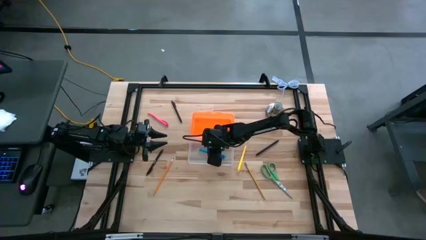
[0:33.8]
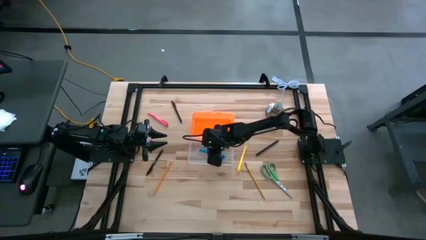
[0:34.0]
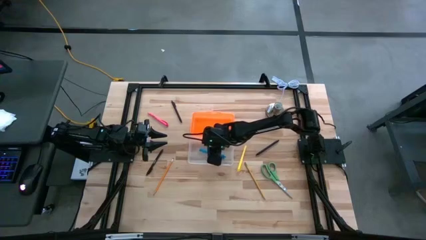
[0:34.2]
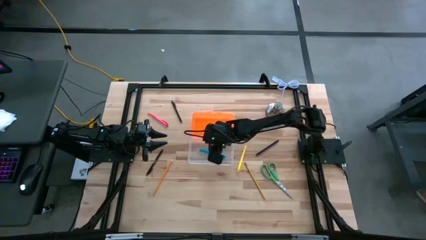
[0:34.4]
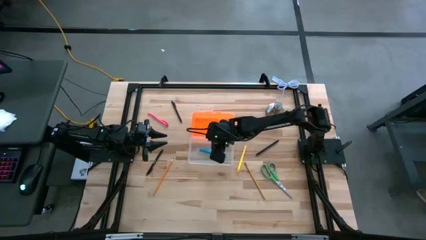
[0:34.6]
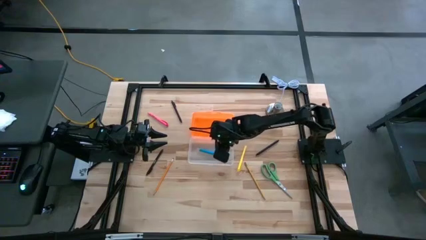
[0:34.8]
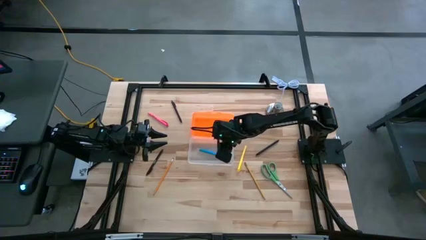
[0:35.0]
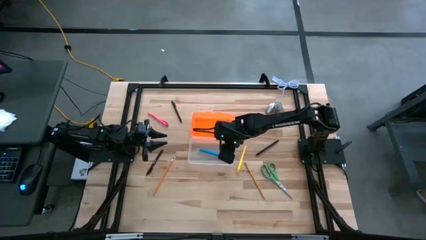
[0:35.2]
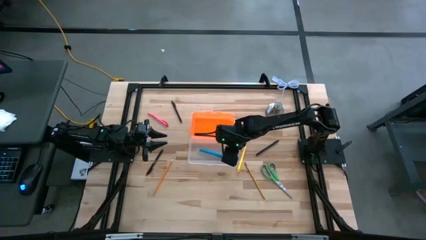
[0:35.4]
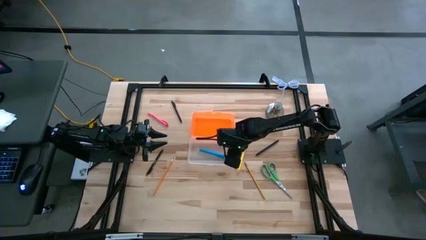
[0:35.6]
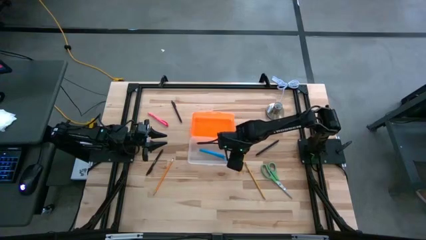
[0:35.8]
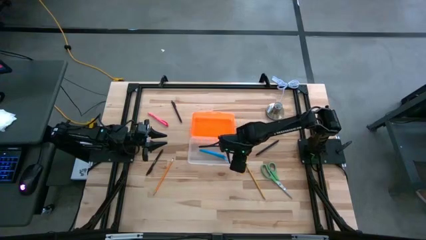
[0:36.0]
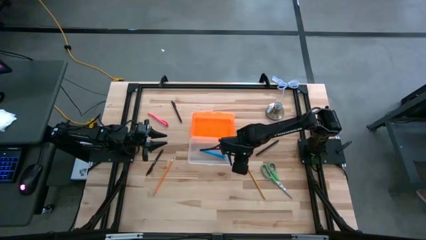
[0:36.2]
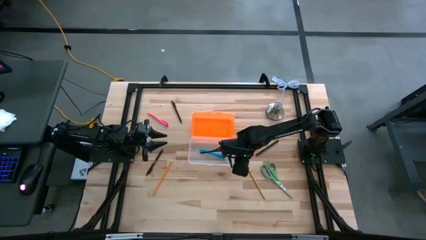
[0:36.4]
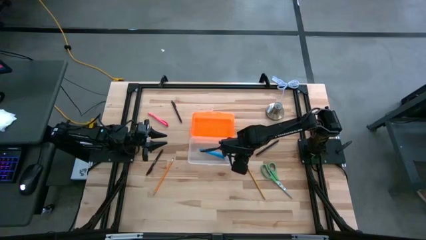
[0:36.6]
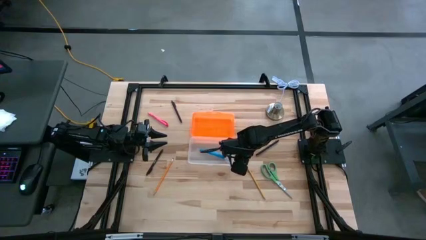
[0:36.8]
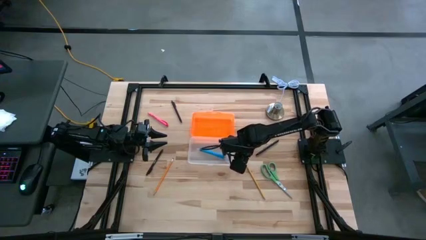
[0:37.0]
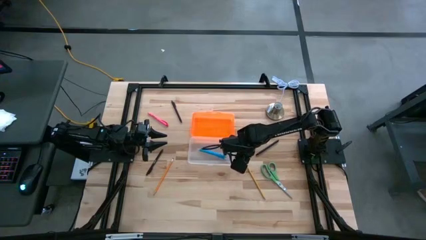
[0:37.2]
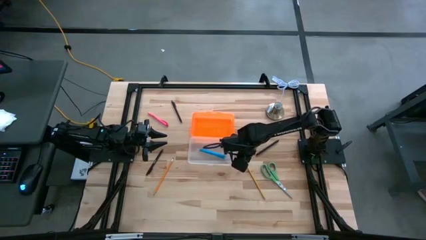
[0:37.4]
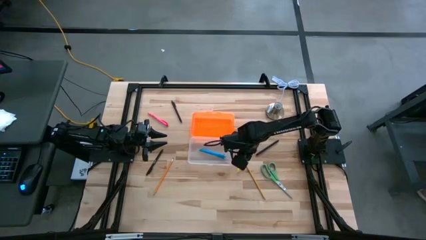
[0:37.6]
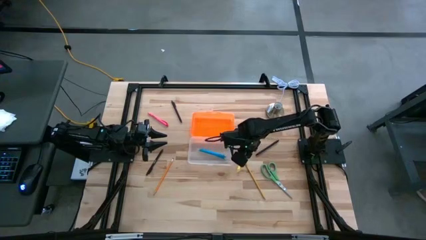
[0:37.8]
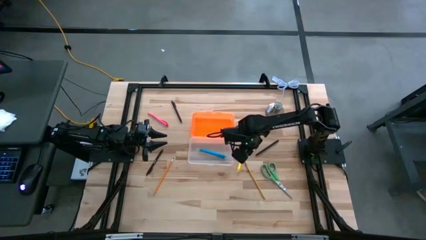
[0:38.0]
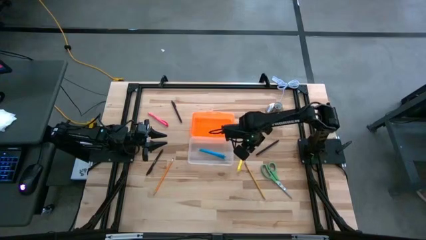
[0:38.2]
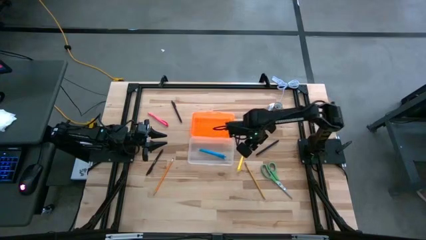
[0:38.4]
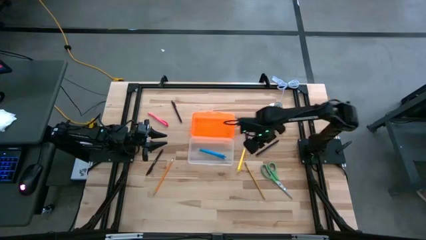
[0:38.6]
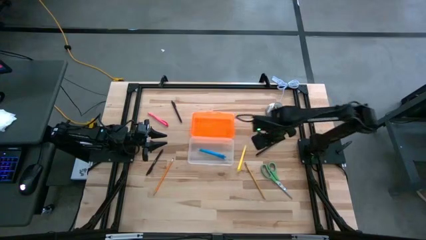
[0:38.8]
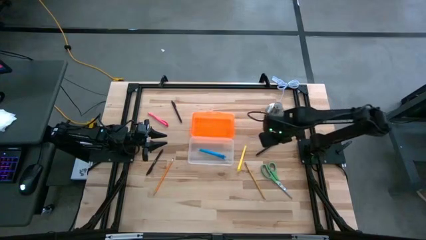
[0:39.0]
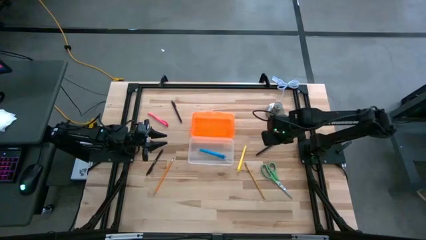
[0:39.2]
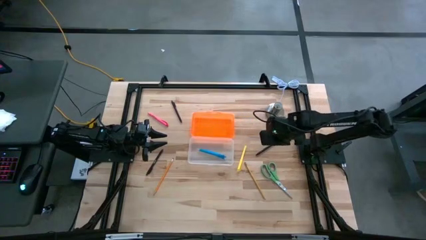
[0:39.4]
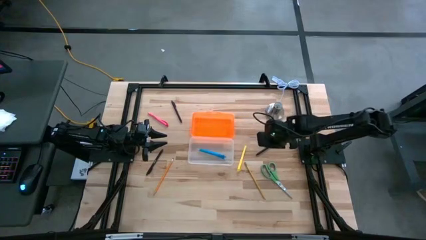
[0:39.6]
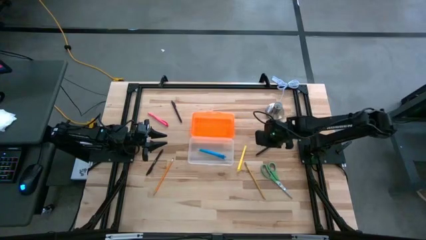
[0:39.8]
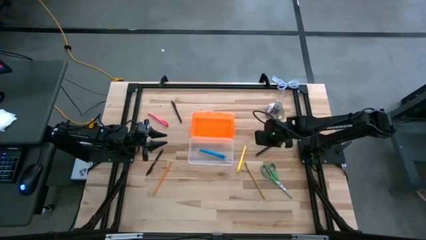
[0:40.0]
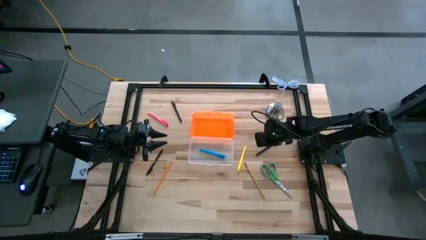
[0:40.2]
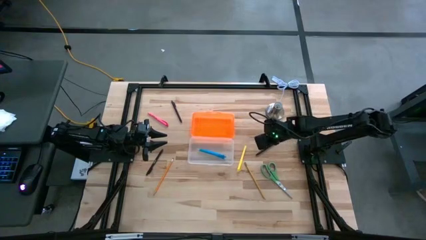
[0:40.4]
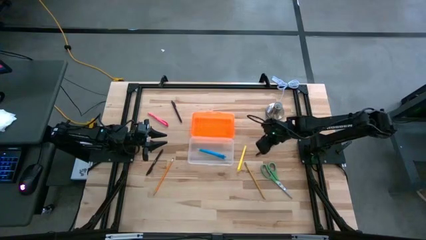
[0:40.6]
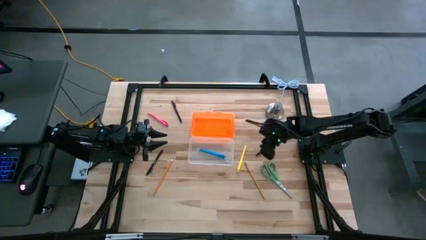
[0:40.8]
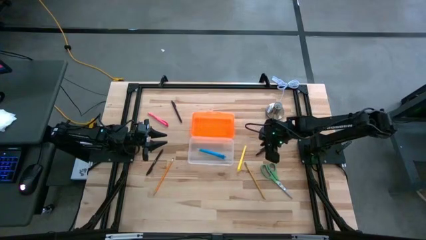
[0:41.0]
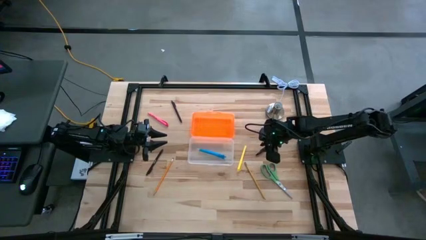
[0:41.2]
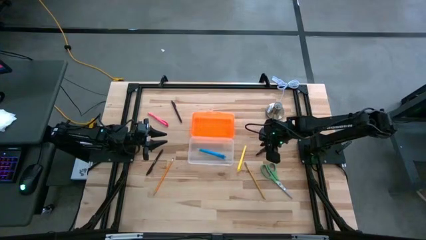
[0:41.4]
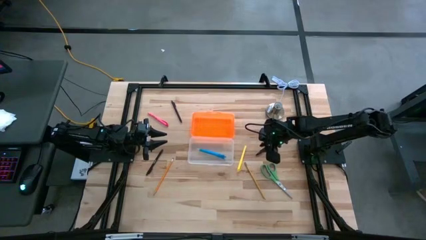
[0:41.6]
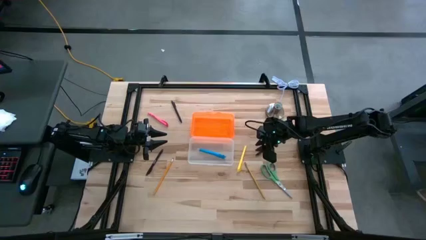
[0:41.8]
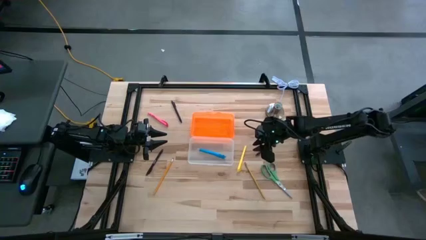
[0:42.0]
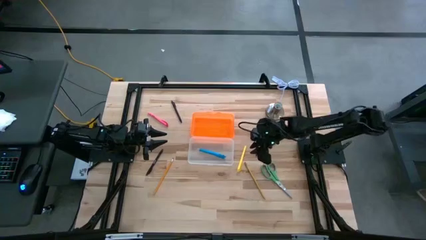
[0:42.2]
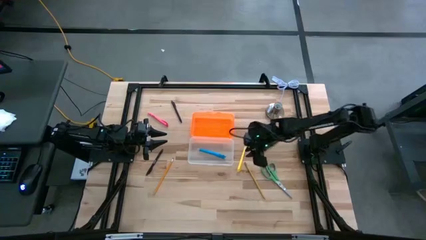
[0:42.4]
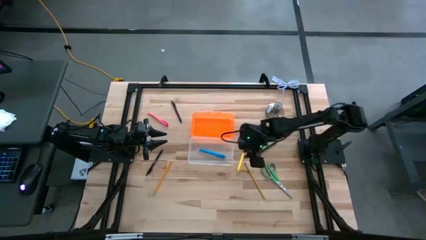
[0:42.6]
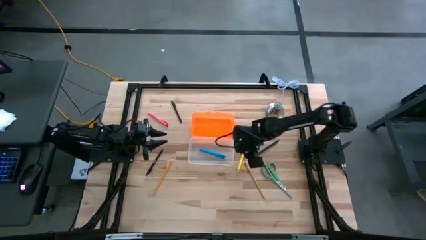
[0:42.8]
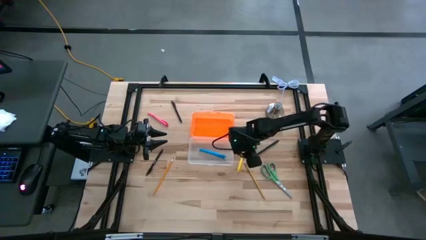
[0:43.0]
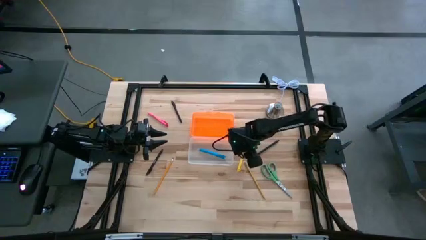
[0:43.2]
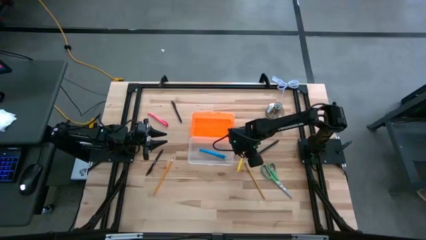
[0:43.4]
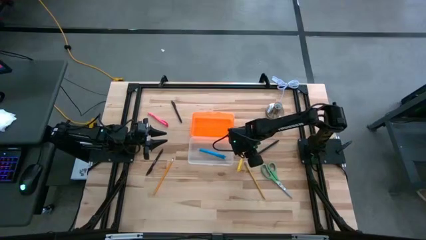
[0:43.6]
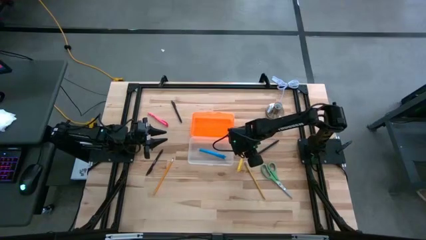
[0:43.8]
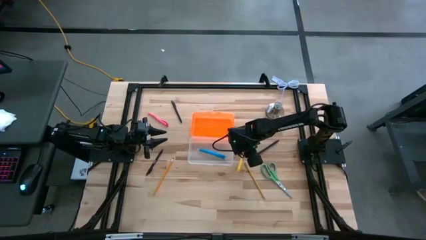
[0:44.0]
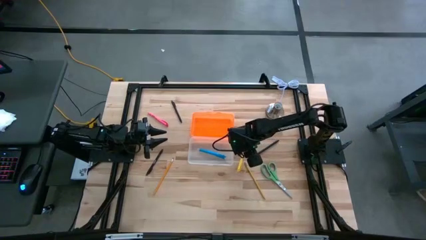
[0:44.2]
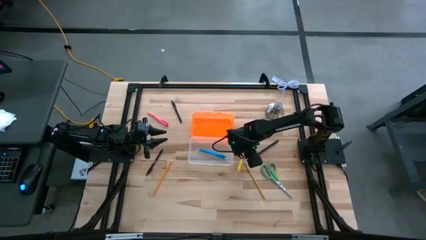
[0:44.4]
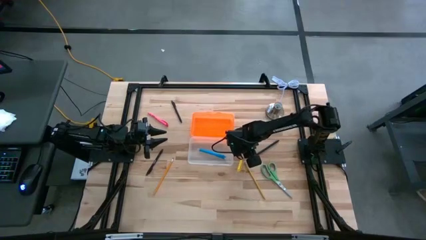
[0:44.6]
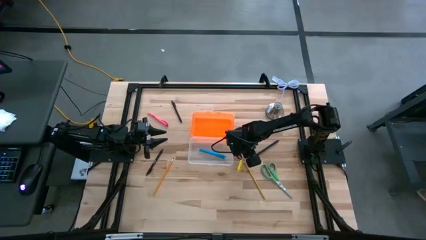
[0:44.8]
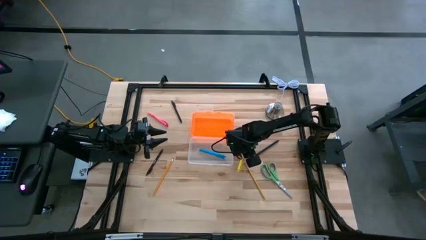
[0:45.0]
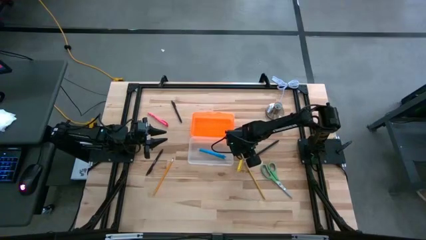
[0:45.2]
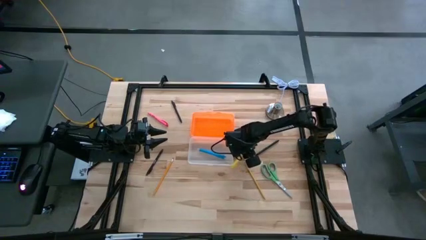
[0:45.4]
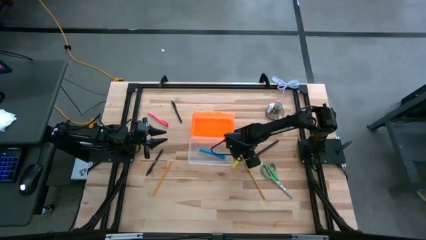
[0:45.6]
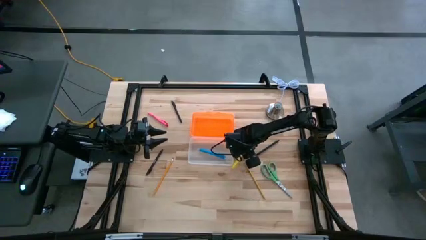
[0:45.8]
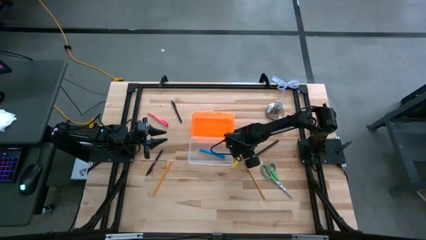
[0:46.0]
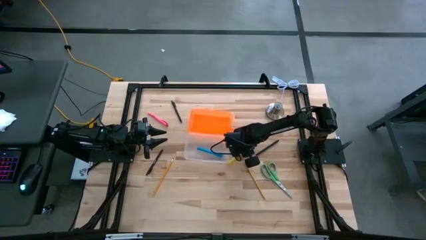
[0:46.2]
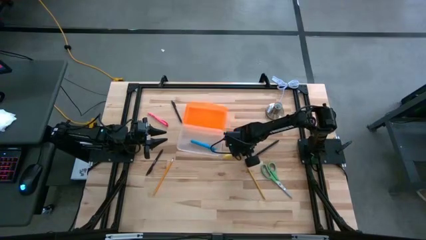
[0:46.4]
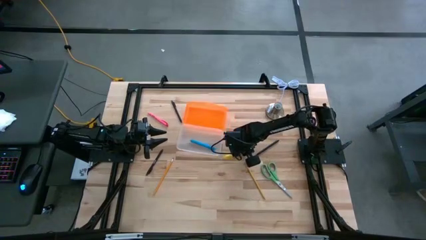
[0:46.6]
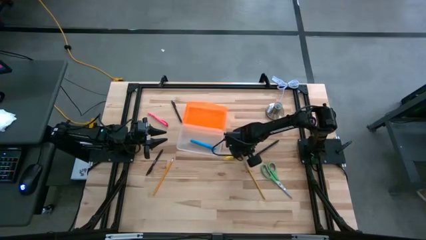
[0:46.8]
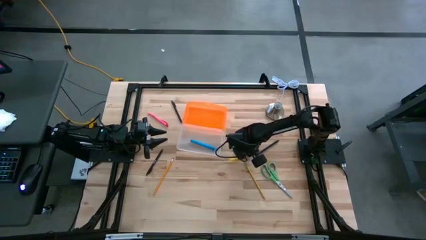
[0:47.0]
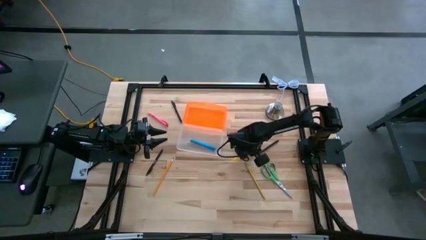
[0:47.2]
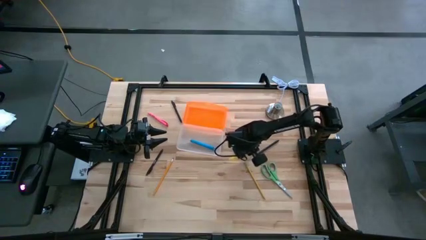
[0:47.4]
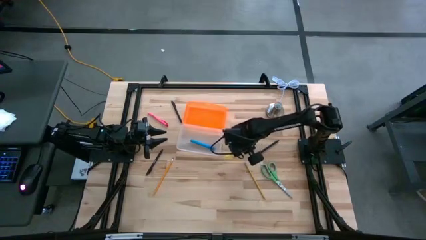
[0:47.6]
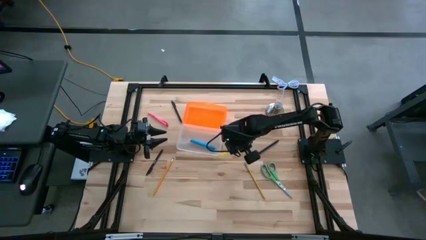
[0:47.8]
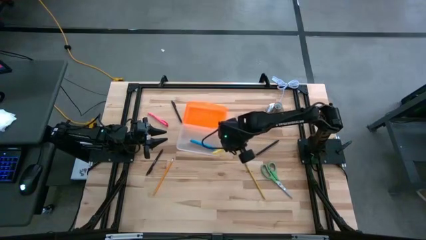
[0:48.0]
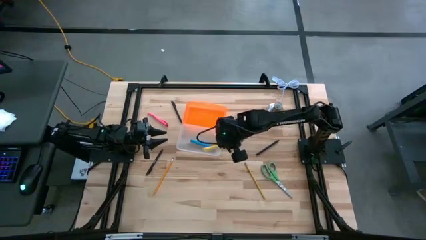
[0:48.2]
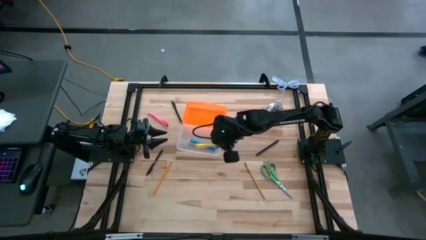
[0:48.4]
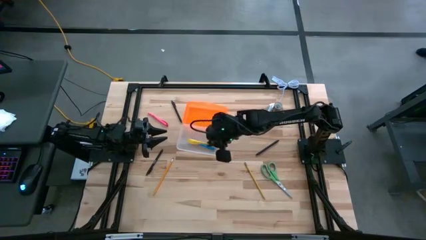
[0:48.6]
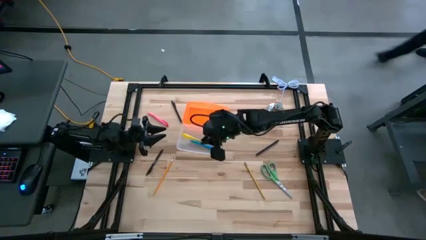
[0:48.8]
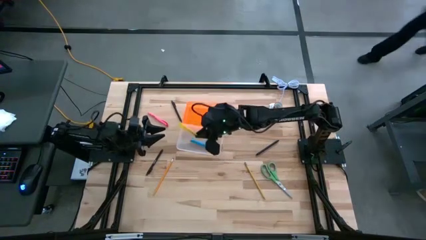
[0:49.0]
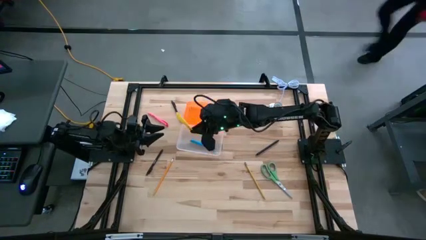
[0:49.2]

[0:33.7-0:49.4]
Task: Pick & place school supplies into a supply box
Put the yellow pen into the orange supply box
